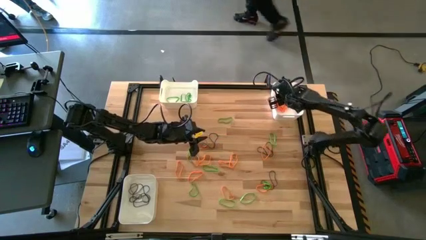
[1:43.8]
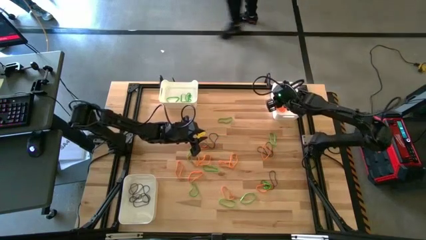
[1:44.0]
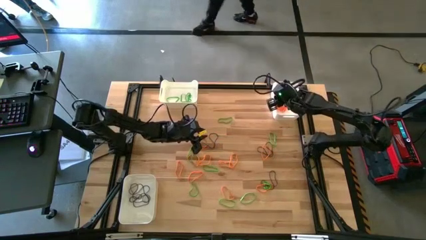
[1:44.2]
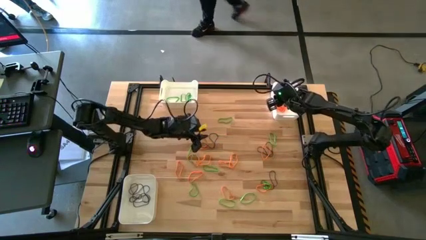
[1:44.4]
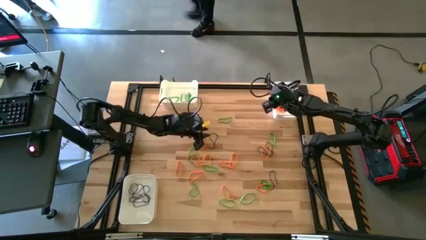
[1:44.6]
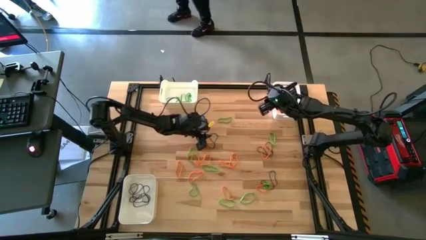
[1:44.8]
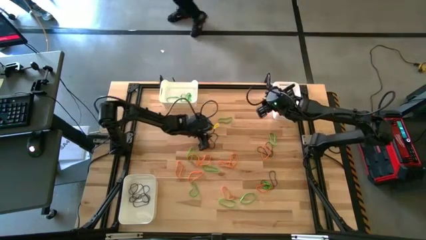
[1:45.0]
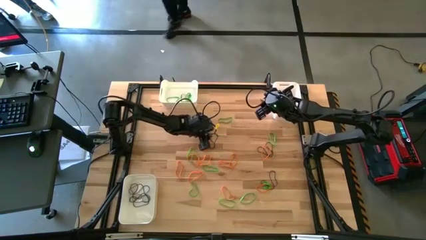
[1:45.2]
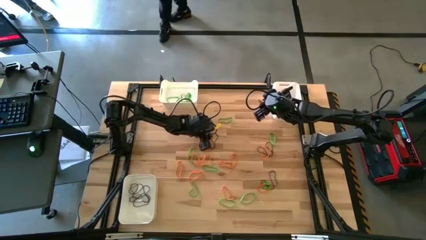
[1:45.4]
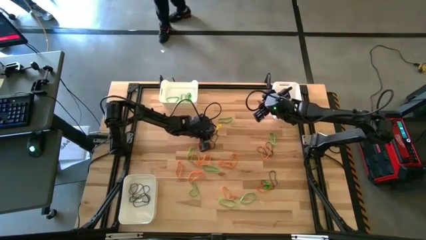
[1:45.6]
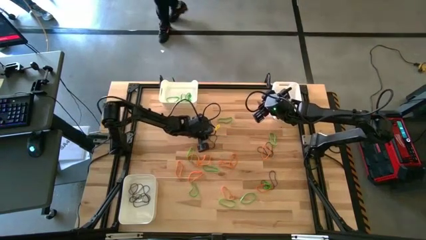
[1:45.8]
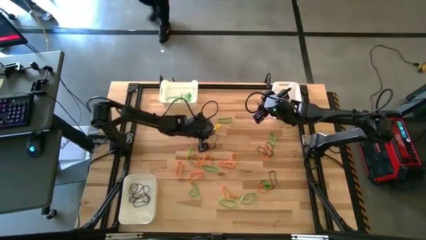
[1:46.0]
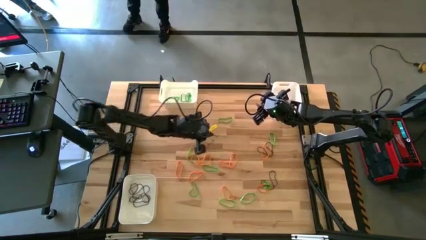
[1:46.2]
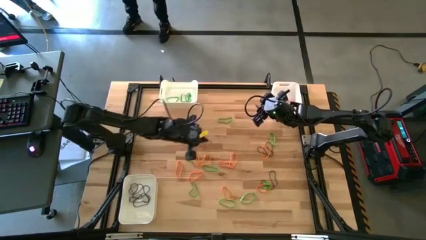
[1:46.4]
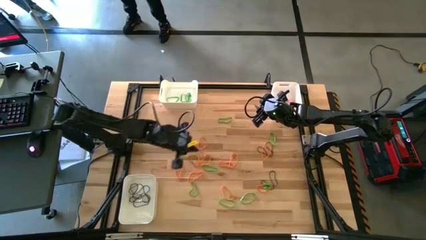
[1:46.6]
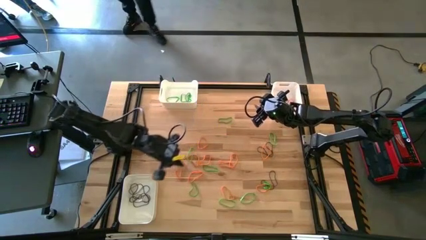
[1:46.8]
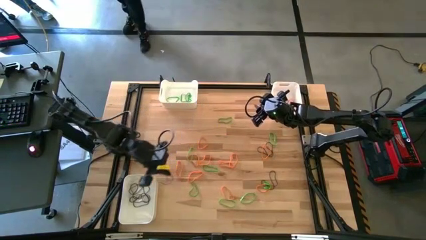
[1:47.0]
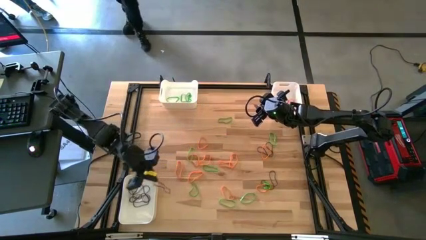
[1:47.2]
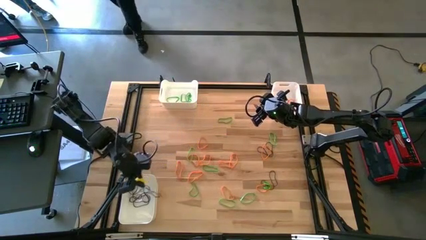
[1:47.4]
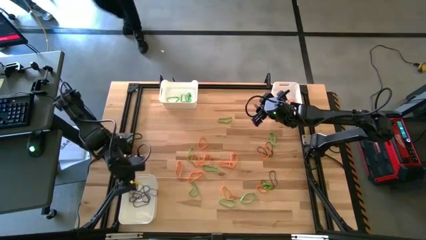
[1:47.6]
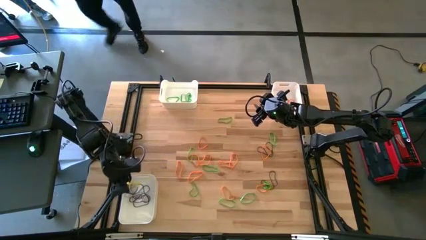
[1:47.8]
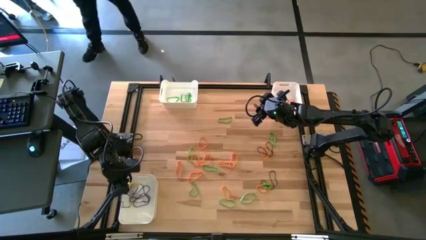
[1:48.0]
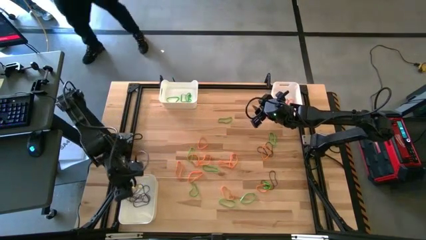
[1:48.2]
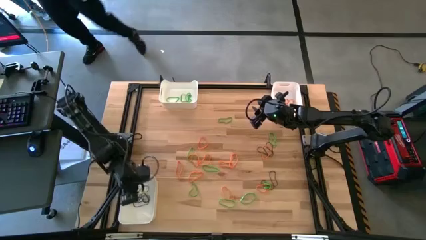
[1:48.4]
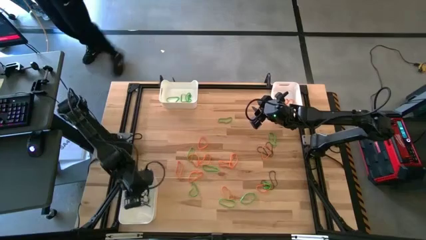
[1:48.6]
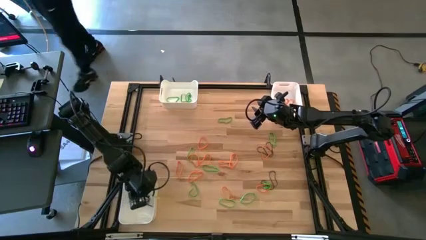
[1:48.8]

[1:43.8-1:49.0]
Task: Sort rubber bands into baskets
Put the purple rubber band into the bottom left white bin

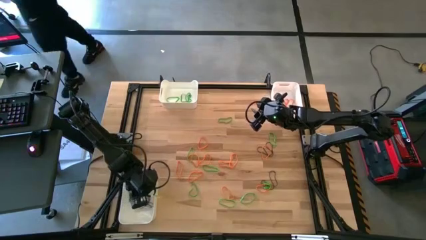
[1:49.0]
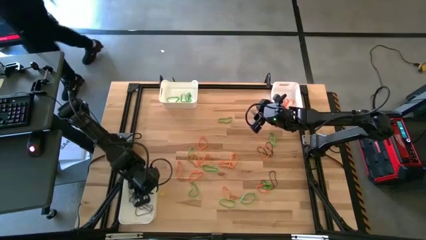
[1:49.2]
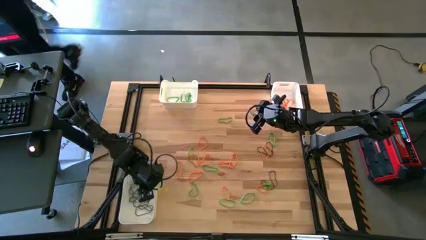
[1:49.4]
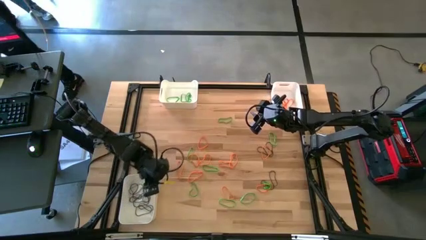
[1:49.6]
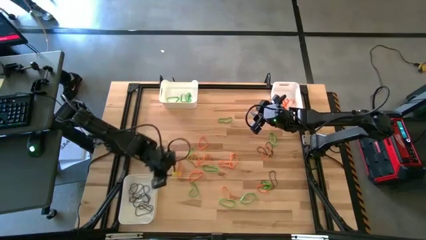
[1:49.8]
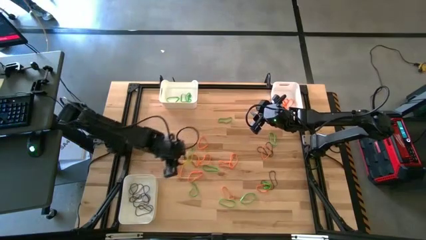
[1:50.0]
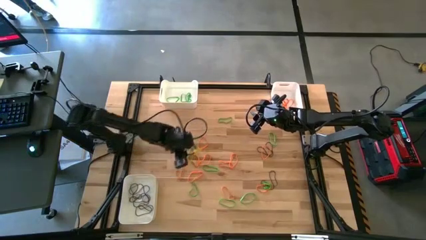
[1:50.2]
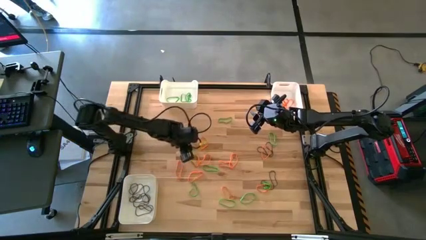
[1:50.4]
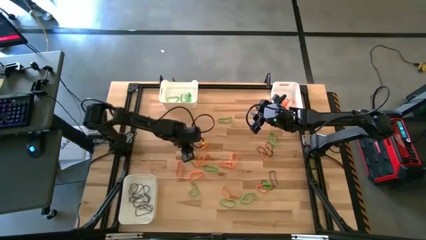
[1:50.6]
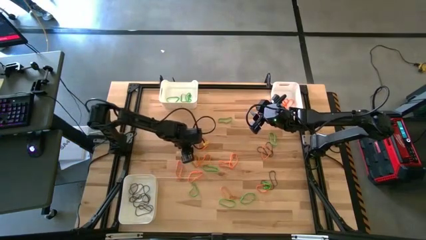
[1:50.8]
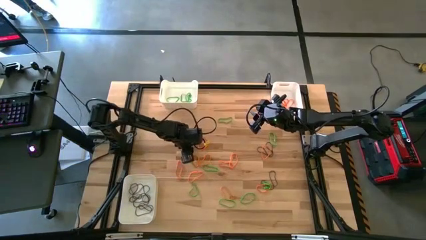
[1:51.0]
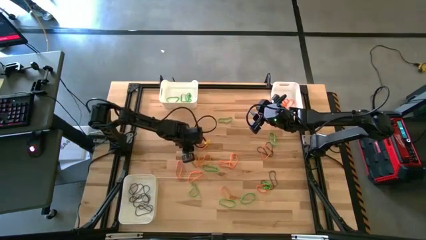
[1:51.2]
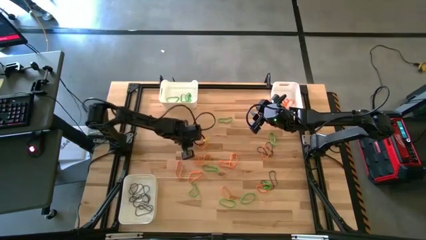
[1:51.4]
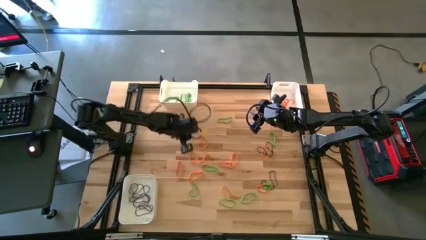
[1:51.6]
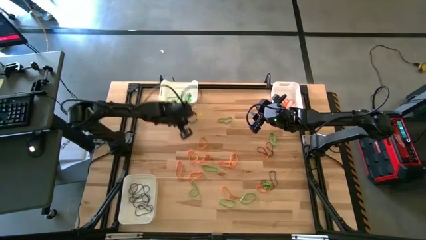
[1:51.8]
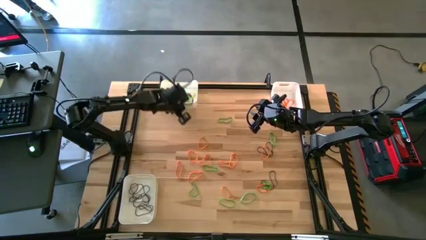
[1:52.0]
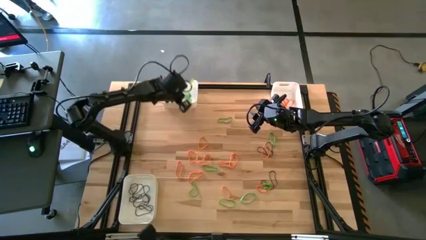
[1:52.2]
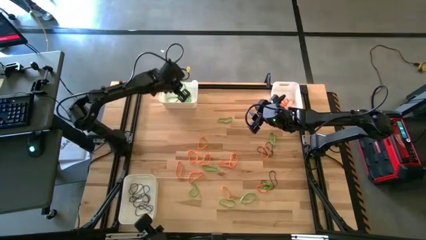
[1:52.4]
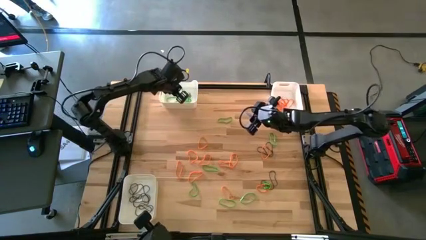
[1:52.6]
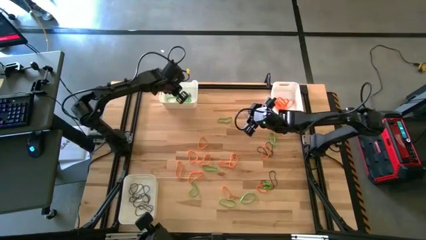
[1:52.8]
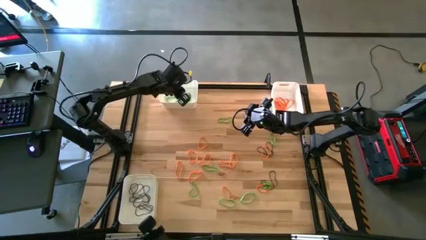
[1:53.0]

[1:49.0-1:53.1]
Put the green rubber band into the top left white bin

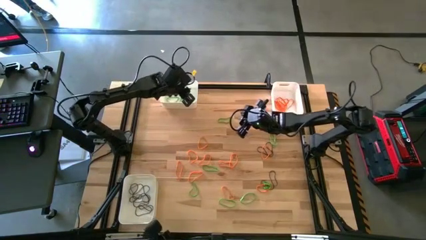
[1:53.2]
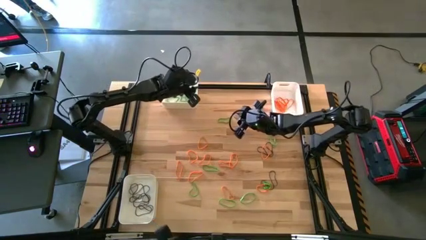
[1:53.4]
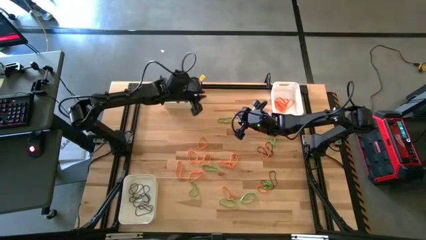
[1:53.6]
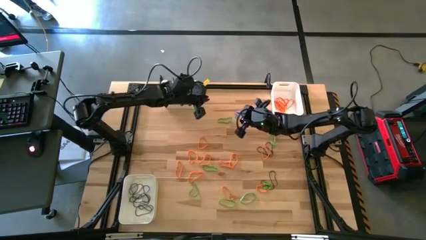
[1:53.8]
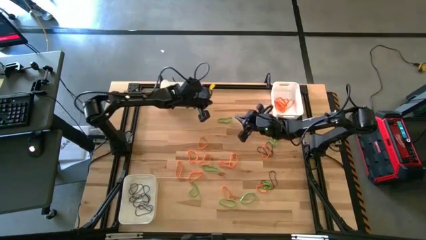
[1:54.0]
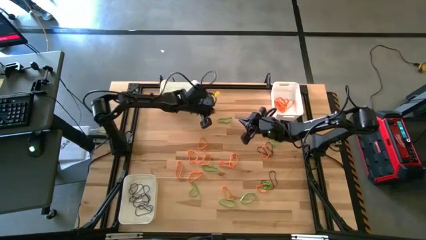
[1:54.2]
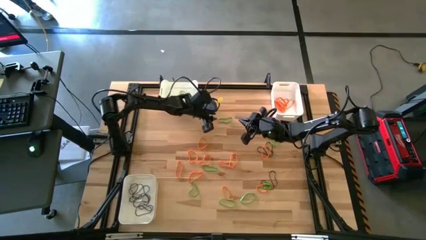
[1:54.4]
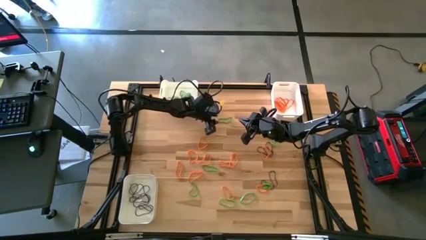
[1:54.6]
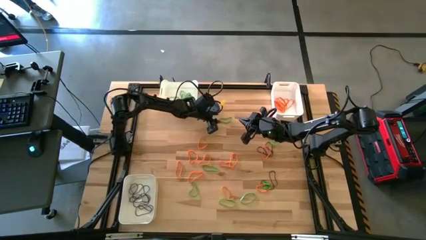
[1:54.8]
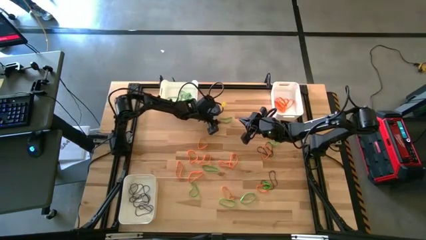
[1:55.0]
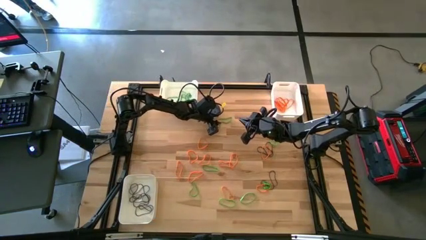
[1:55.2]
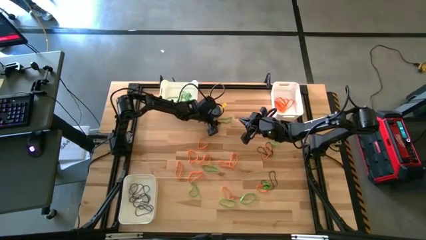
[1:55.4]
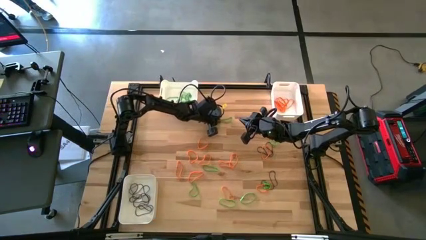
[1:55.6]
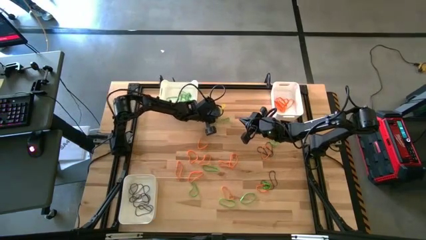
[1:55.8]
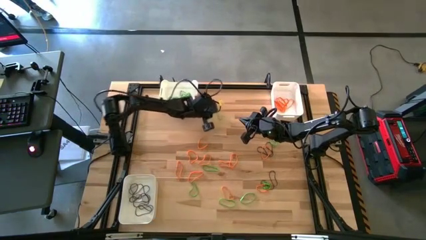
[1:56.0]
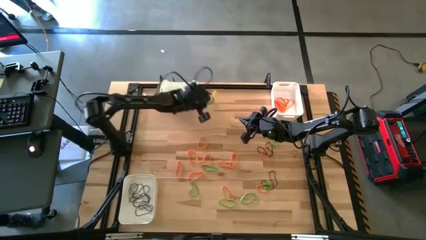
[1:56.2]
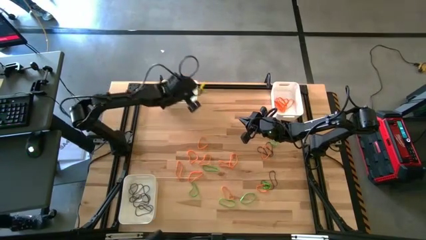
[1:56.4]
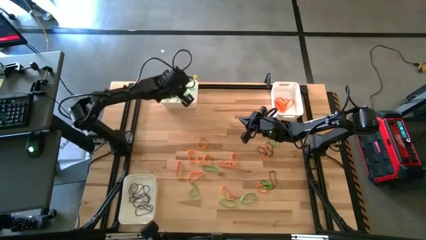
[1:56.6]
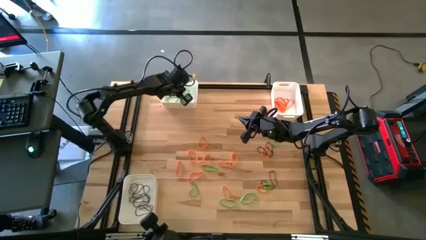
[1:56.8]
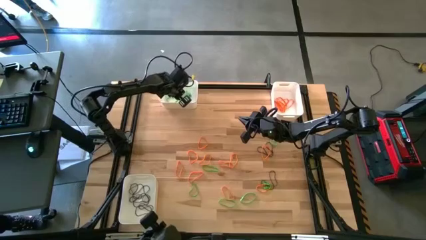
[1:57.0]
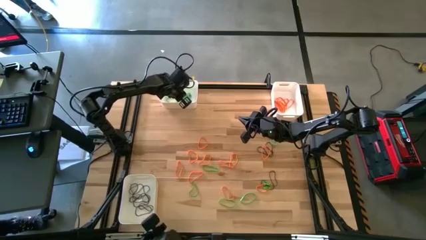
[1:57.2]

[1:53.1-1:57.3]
Put the green rubber band into the top left white bin

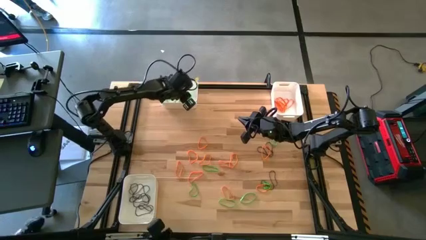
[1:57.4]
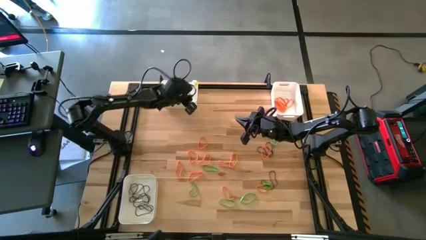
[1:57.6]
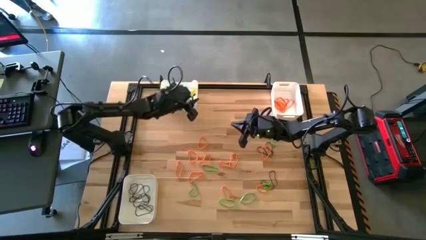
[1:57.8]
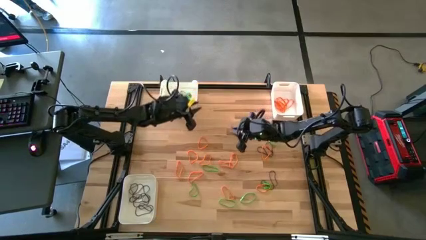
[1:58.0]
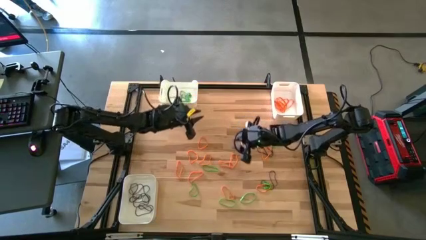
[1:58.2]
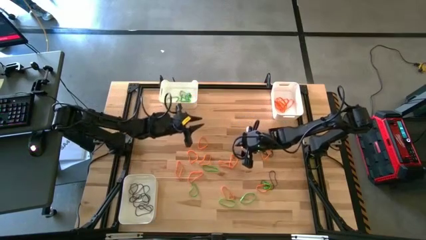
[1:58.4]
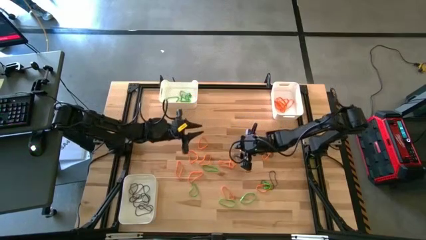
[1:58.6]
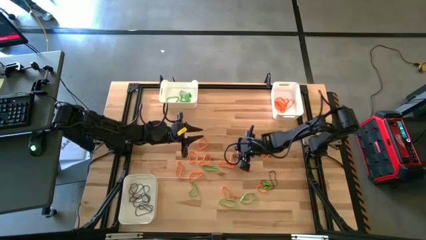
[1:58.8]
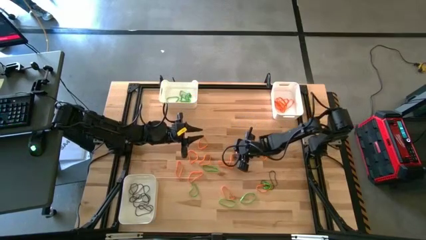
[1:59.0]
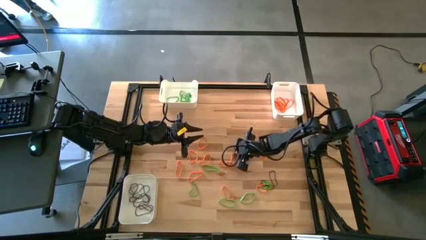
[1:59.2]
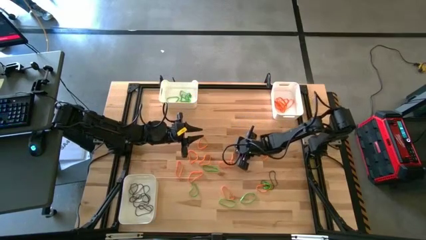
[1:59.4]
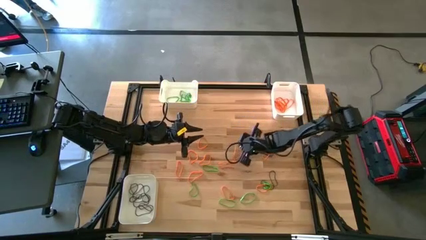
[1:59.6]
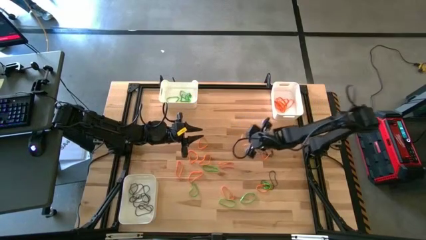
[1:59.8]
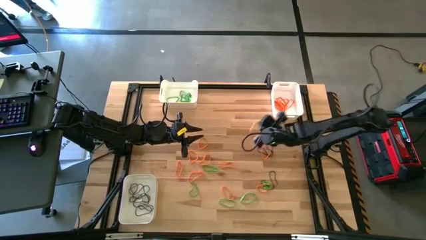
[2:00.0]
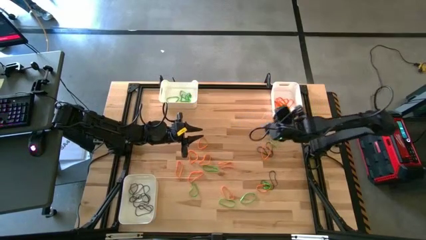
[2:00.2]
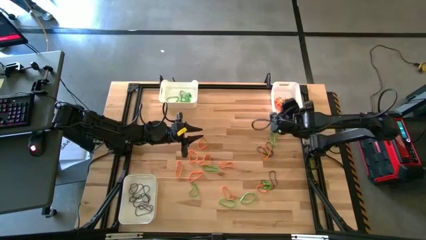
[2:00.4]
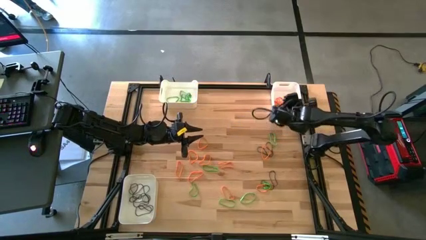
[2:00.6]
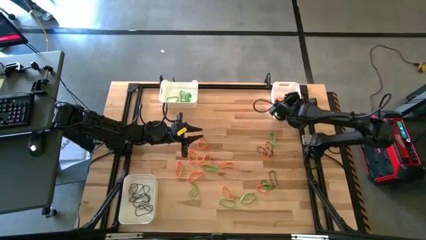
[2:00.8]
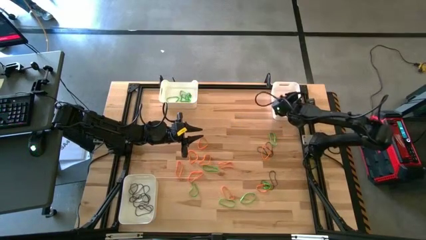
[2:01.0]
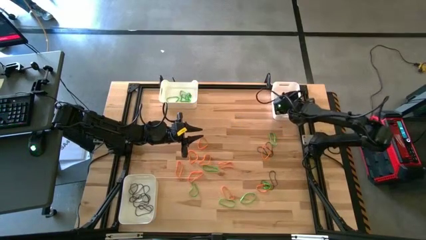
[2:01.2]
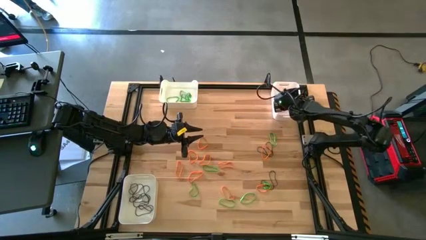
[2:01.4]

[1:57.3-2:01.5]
Put the orange rubber band into the top right white bin
